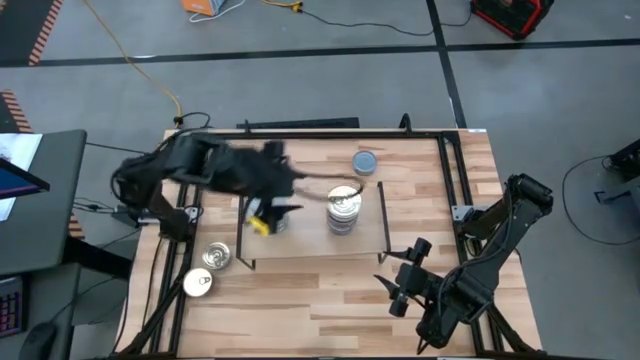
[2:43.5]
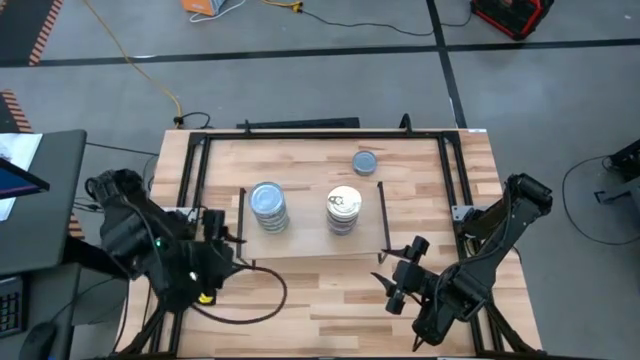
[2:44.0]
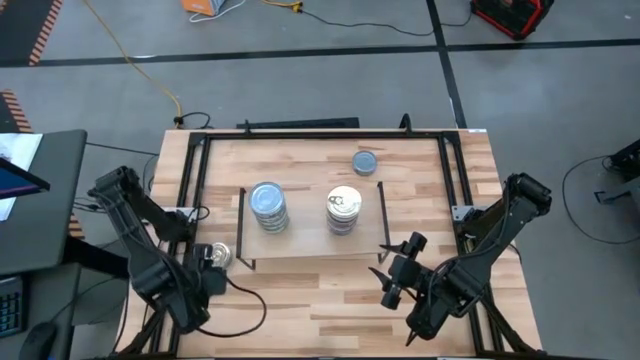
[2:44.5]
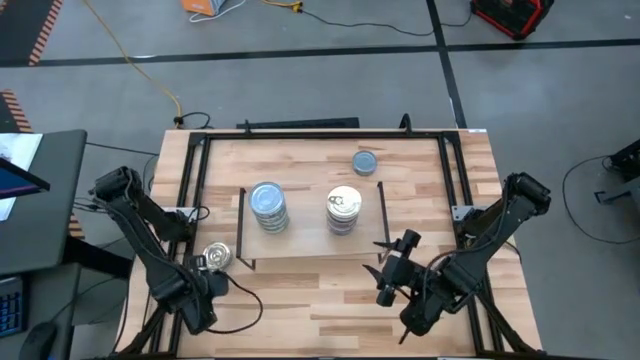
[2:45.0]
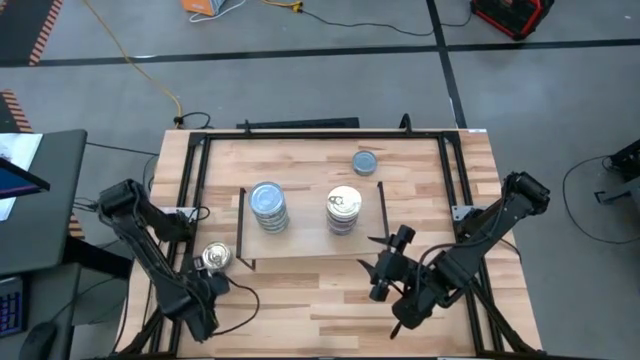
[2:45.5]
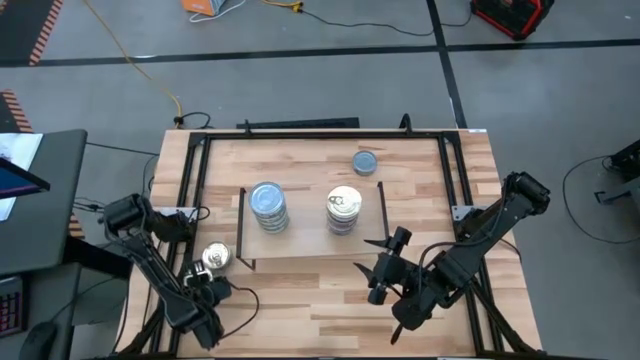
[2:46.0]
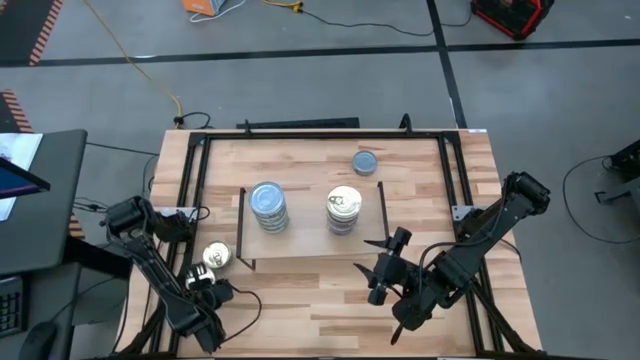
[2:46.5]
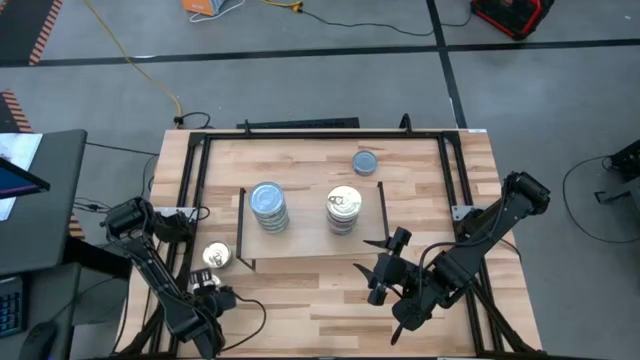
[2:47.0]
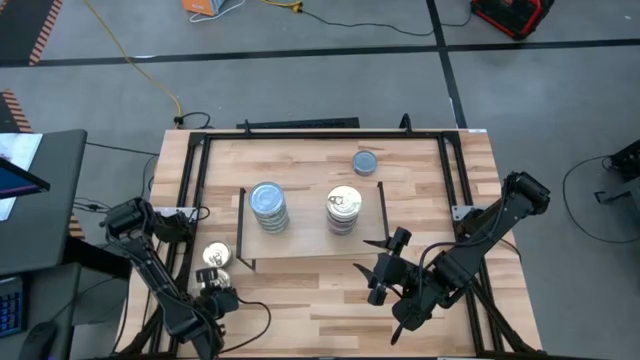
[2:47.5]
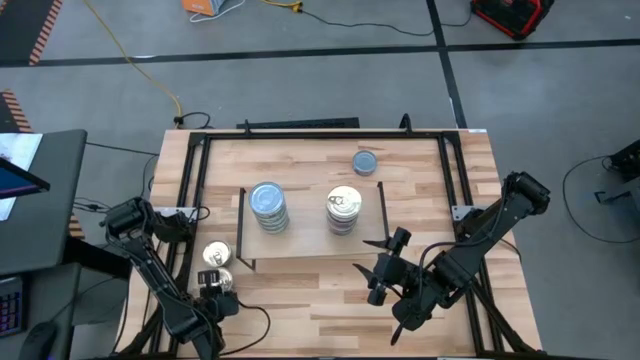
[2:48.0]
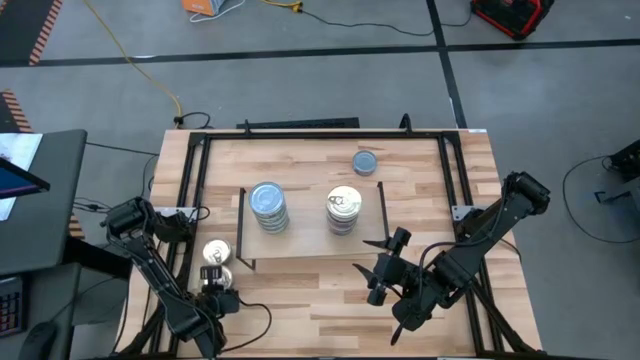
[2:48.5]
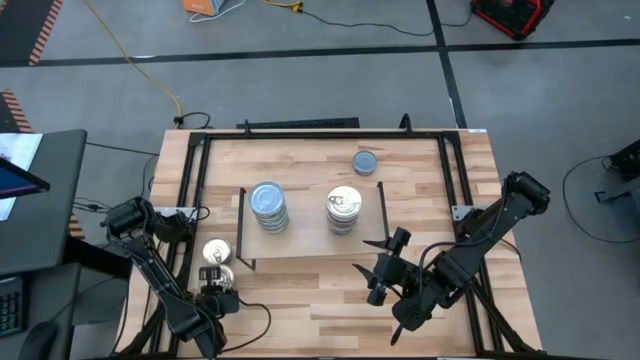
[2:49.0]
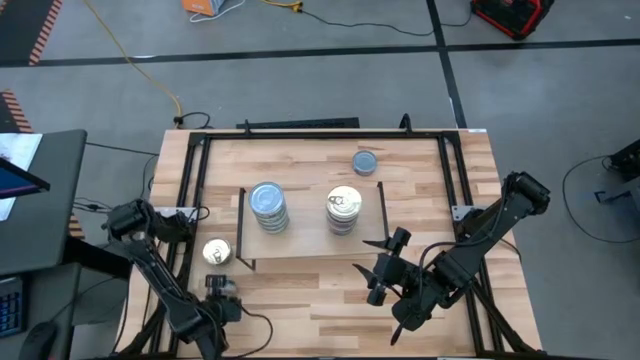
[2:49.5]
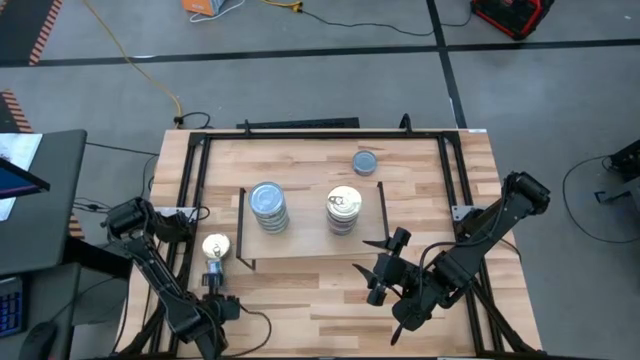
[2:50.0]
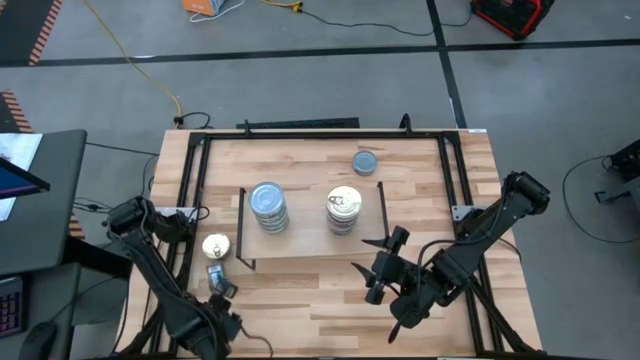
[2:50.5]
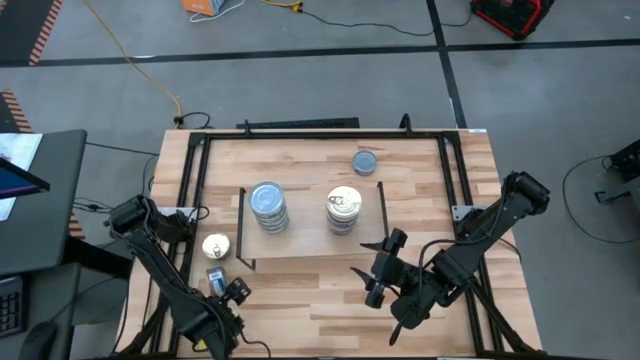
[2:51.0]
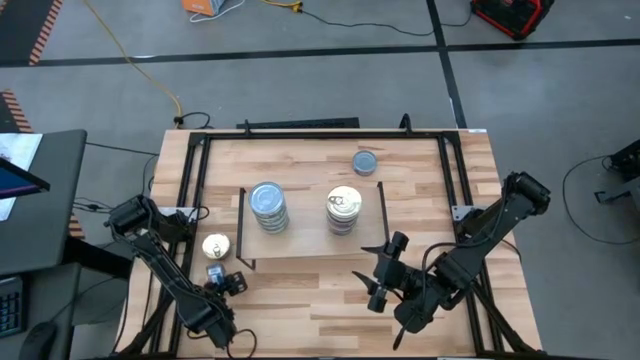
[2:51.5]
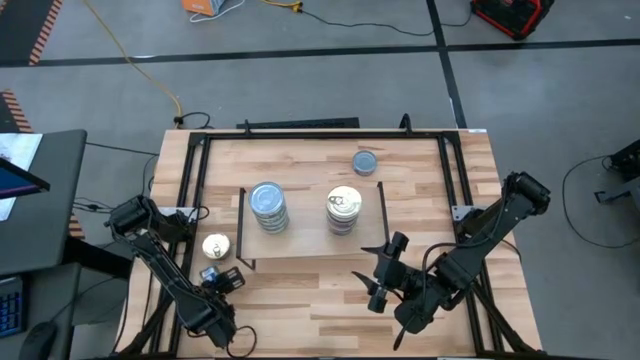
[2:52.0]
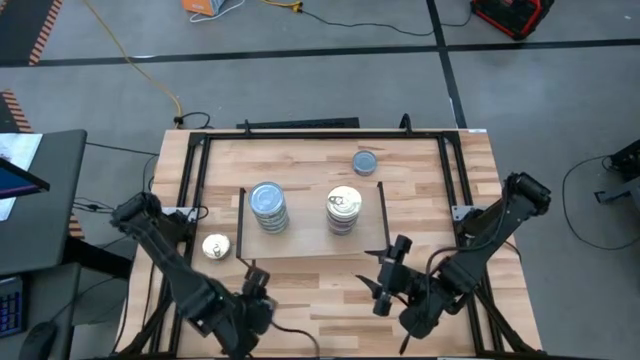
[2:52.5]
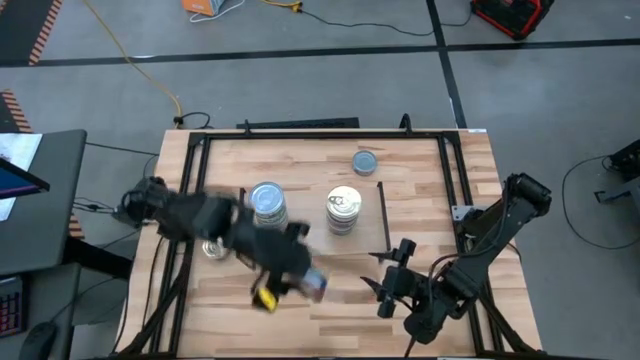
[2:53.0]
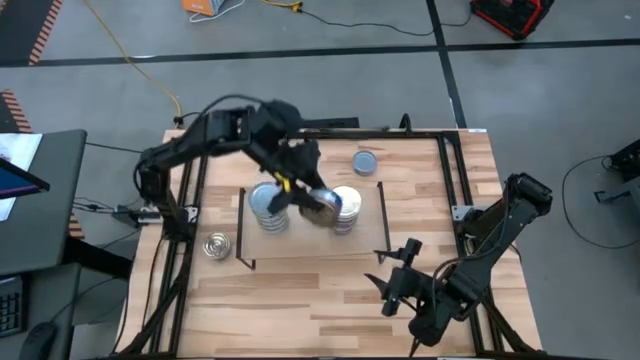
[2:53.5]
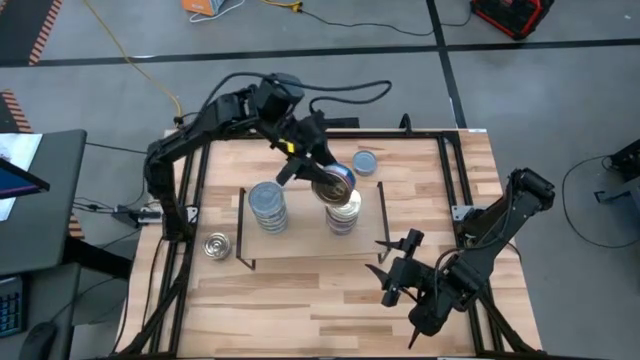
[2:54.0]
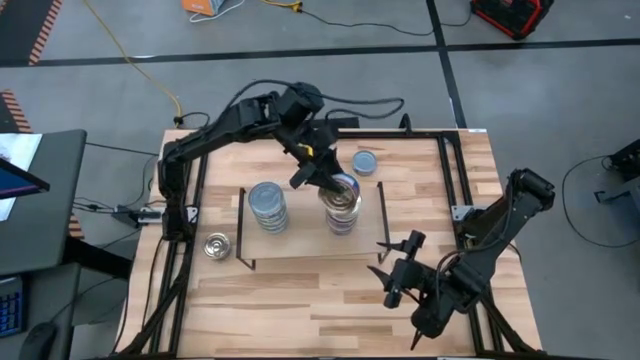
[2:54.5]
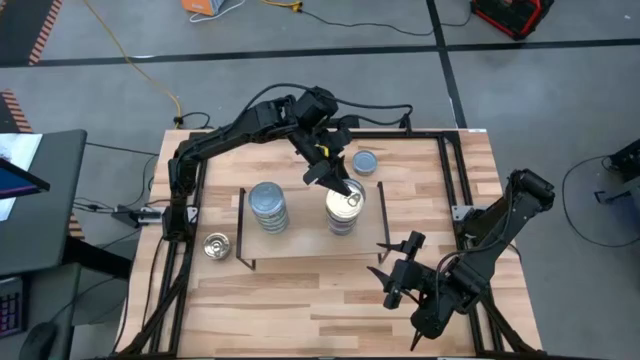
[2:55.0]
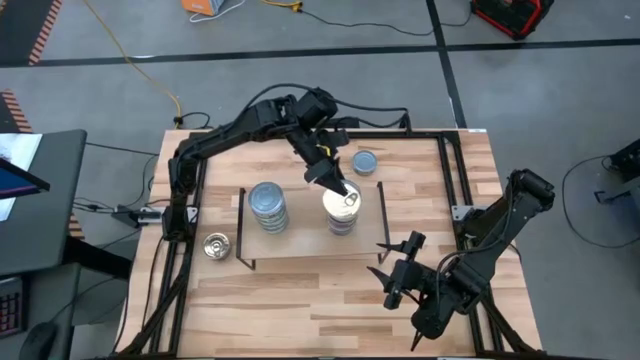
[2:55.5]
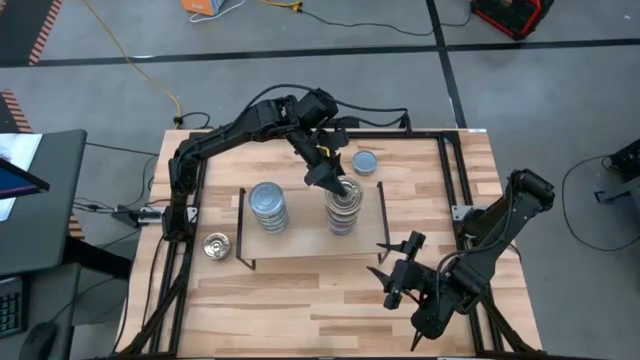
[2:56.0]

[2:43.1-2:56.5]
Task: Stack canned seafood by type on shelf
Stack the blue tuna can on top of the blue tuna can on the shelf

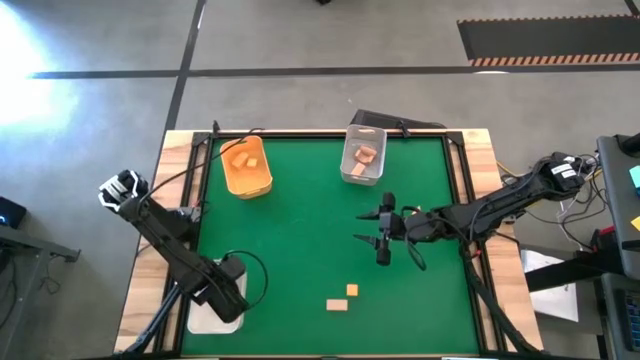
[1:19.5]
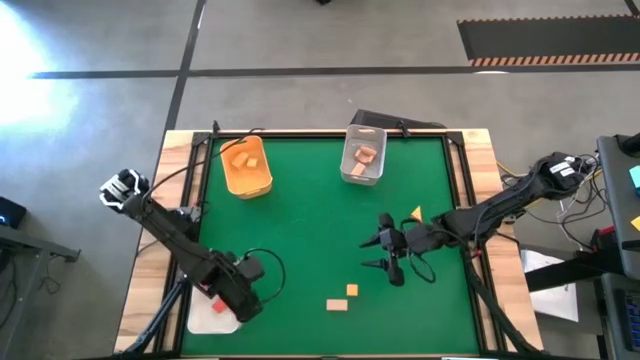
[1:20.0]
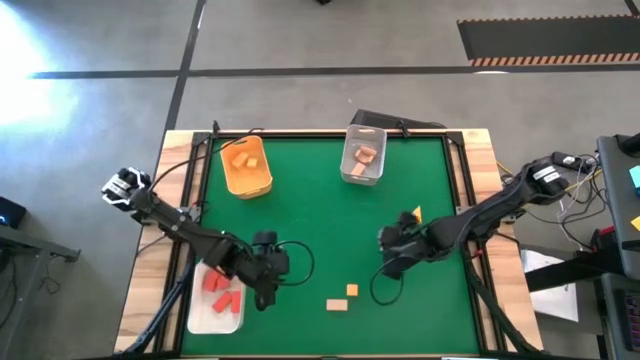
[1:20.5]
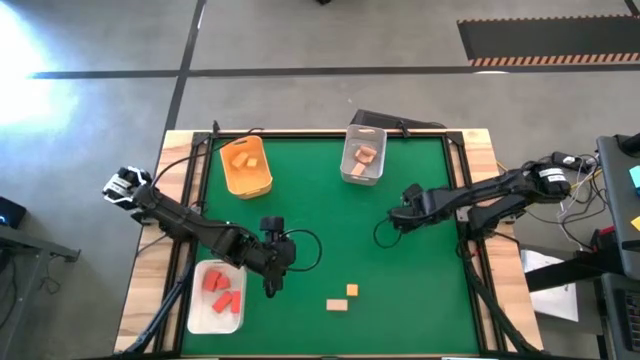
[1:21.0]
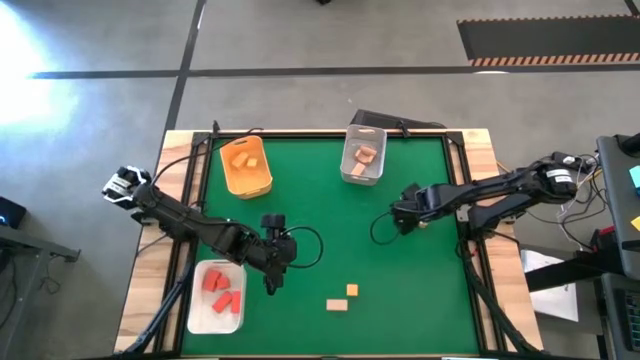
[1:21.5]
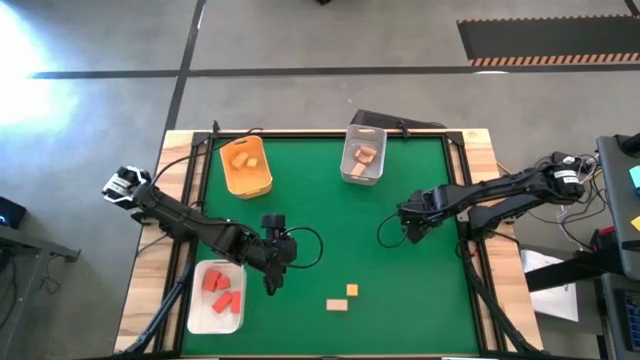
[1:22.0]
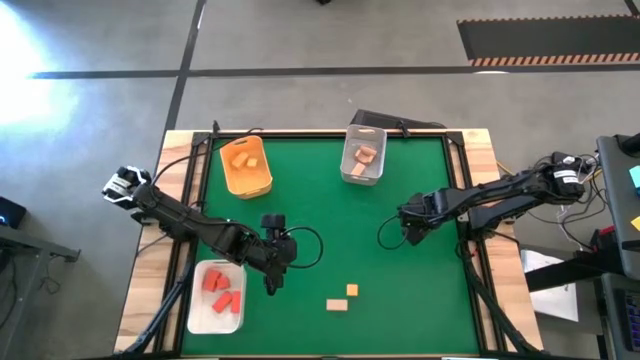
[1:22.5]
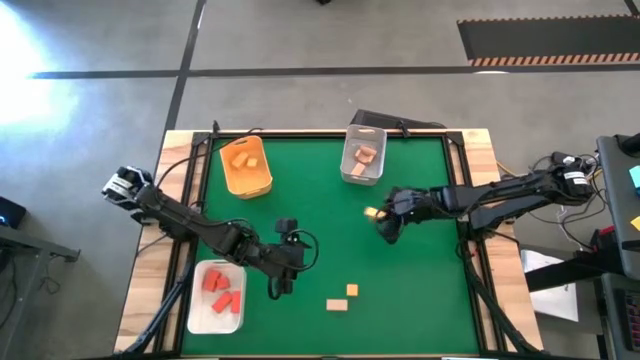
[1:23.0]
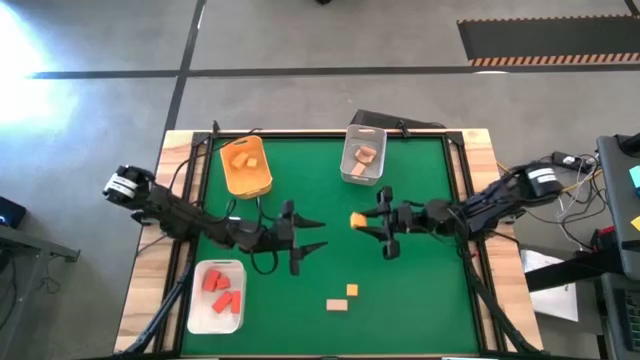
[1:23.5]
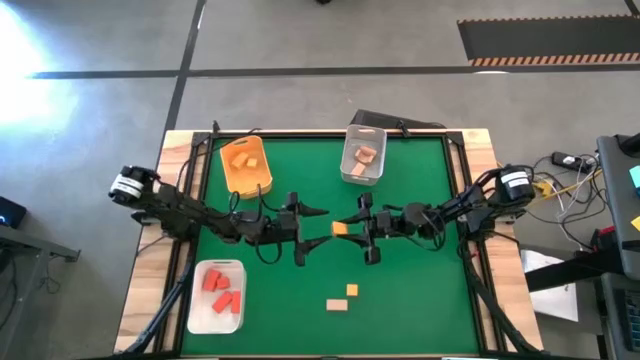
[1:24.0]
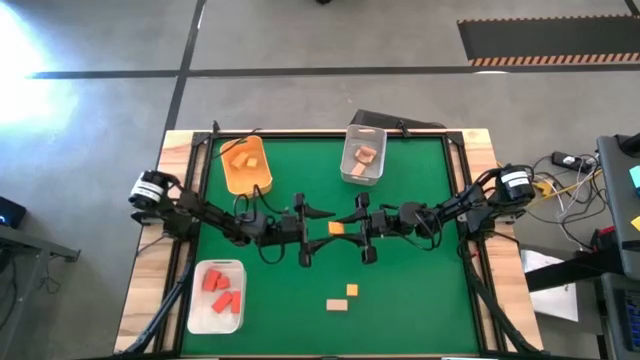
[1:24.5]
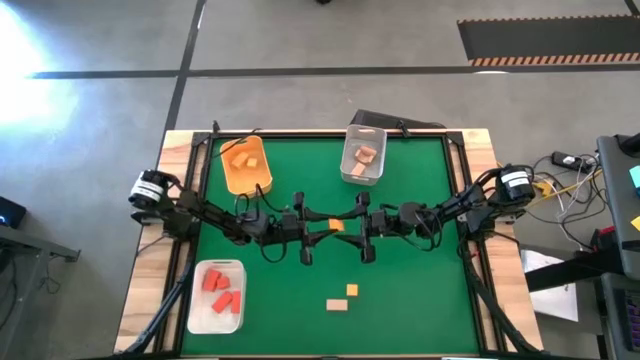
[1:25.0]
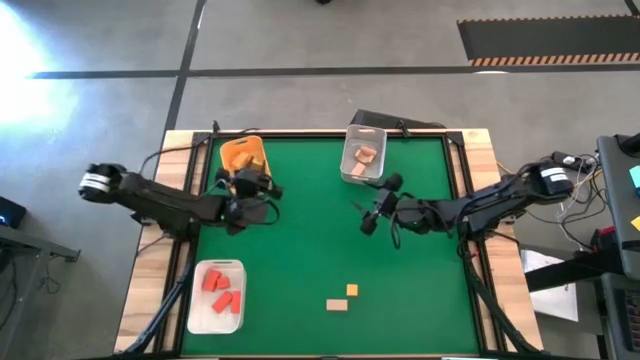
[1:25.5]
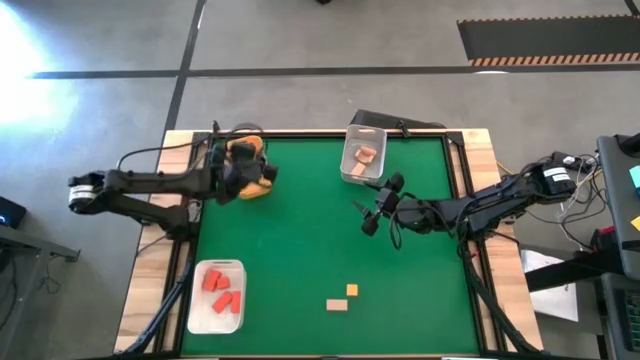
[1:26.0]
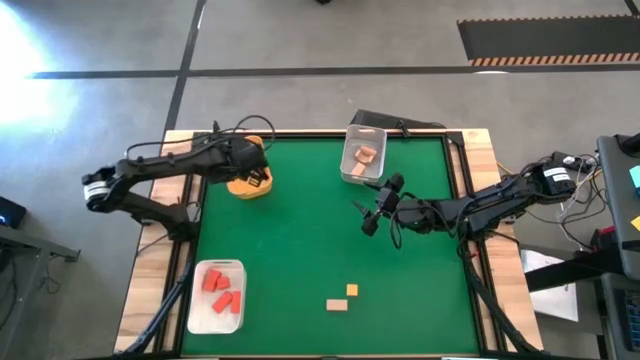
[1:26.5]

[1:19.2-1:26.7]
Task: Sort & place blocks by color
Put the yellow block into the yellow bin
